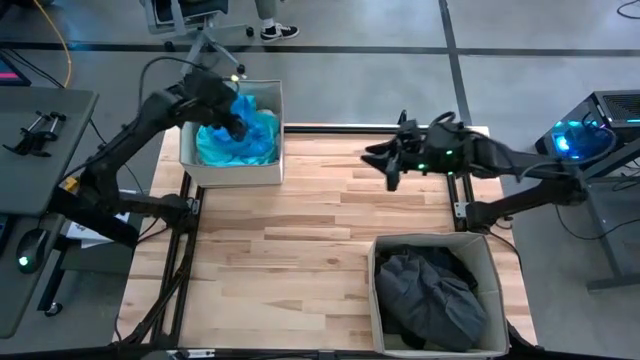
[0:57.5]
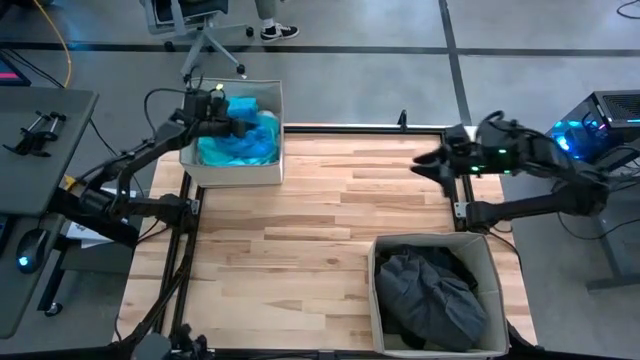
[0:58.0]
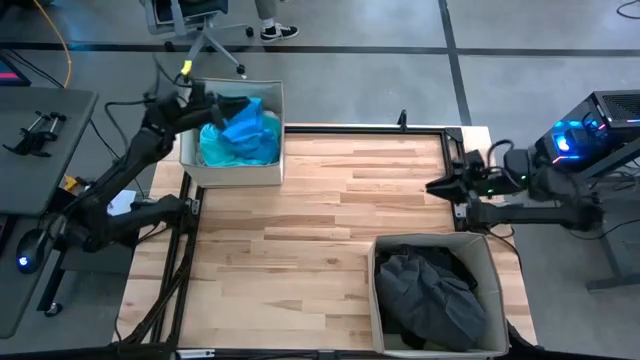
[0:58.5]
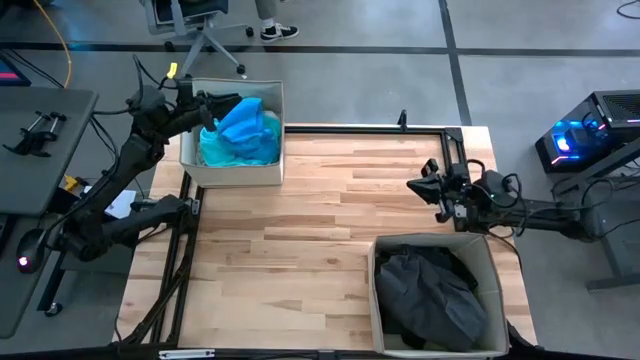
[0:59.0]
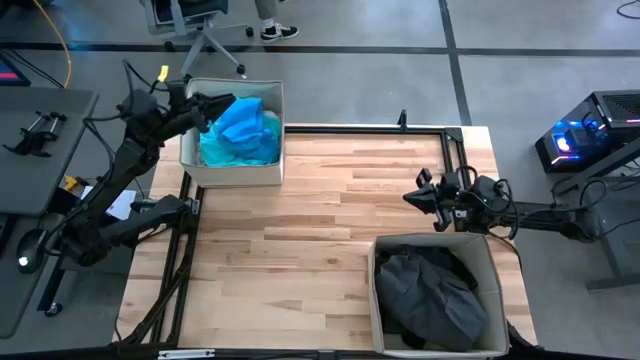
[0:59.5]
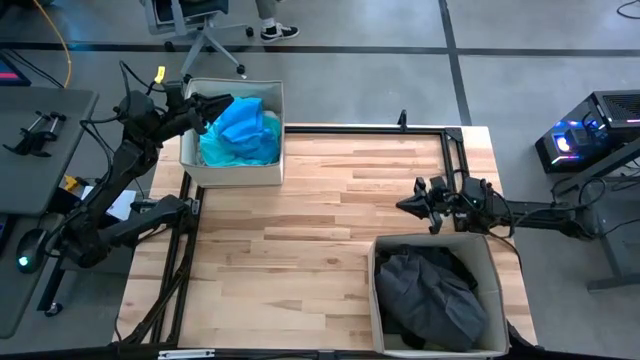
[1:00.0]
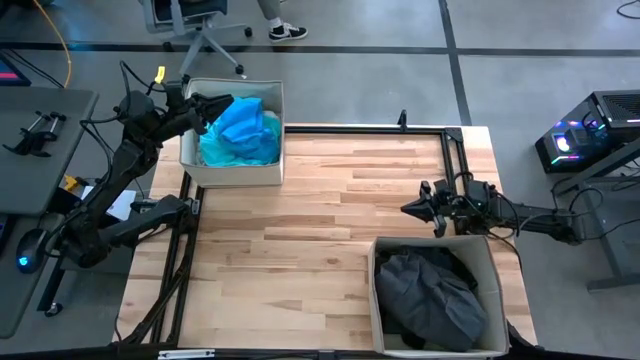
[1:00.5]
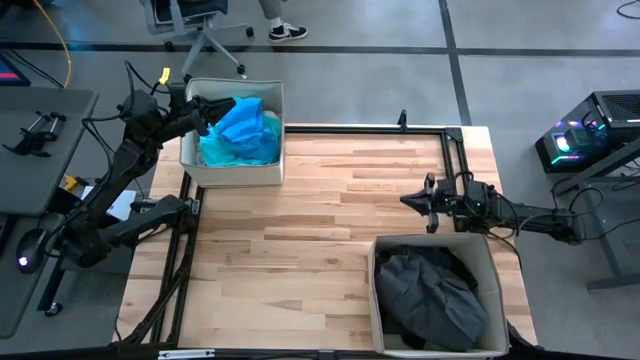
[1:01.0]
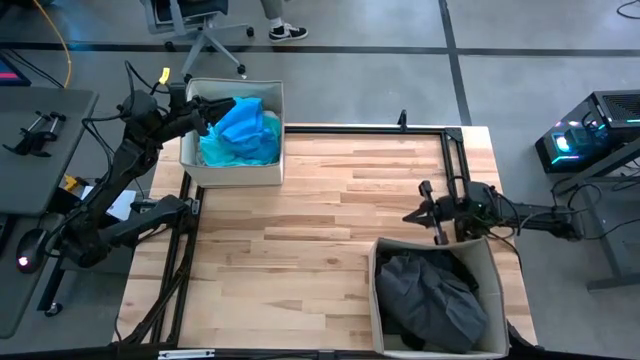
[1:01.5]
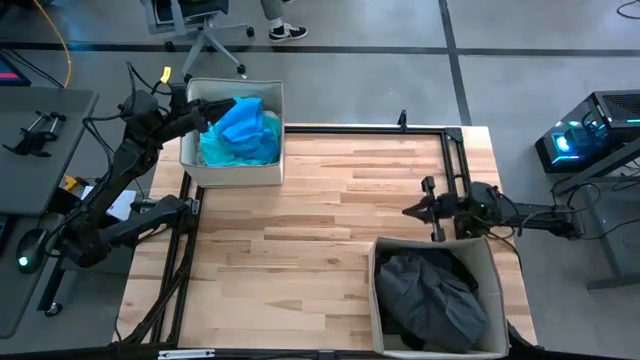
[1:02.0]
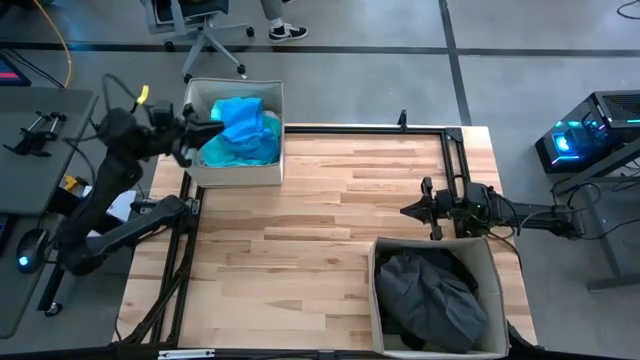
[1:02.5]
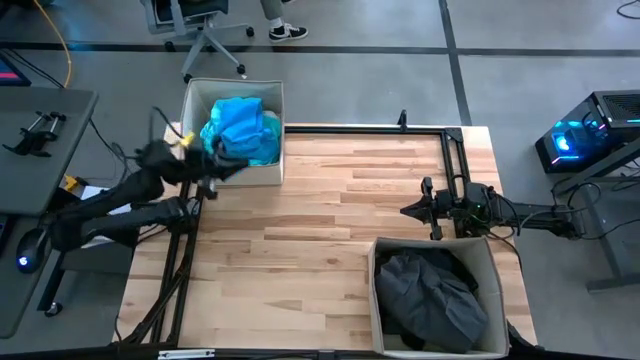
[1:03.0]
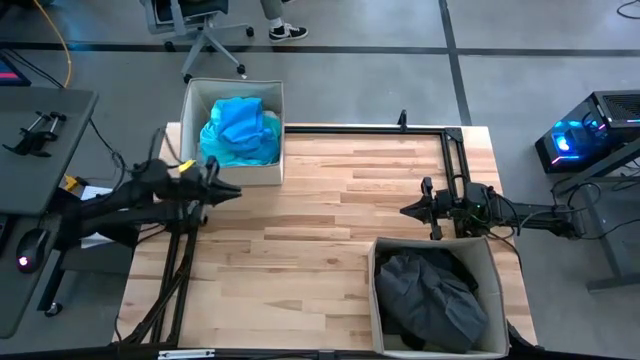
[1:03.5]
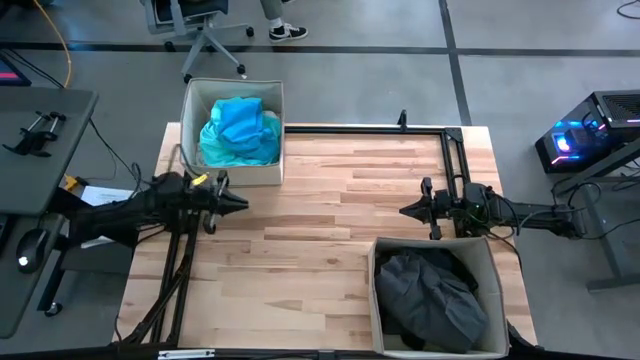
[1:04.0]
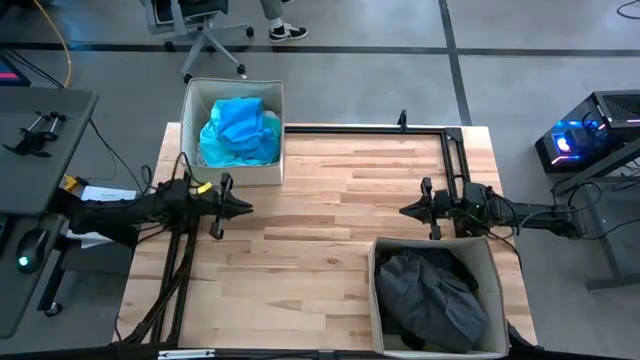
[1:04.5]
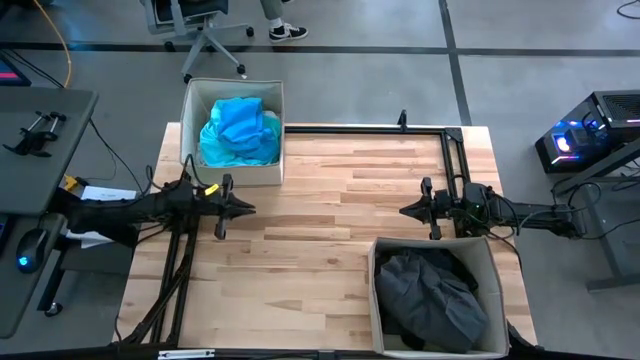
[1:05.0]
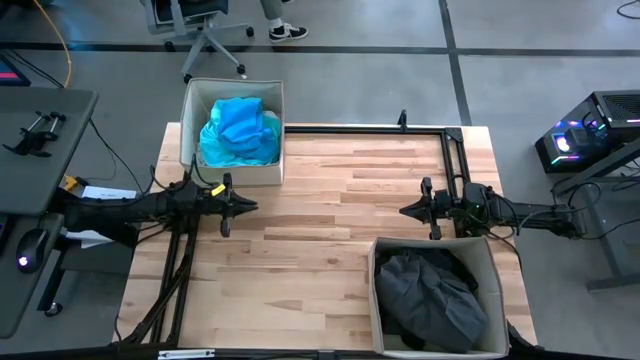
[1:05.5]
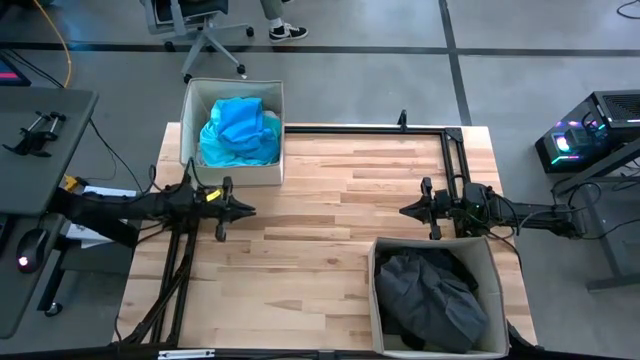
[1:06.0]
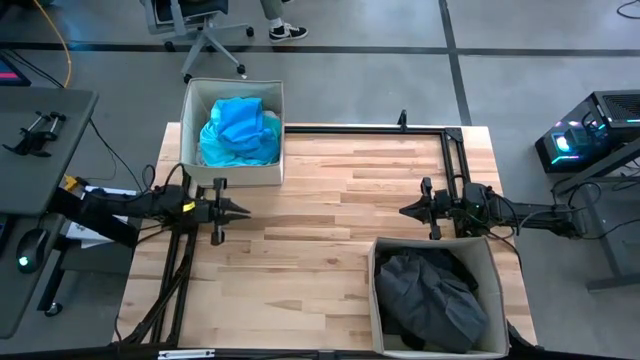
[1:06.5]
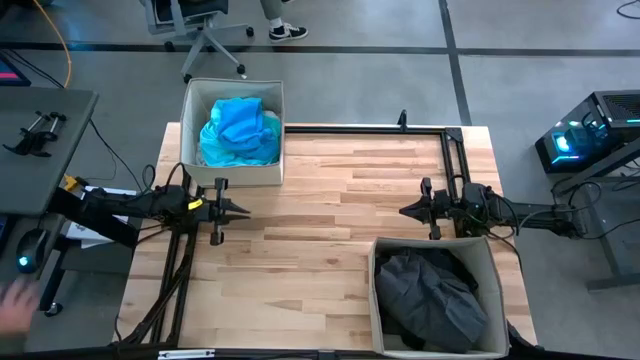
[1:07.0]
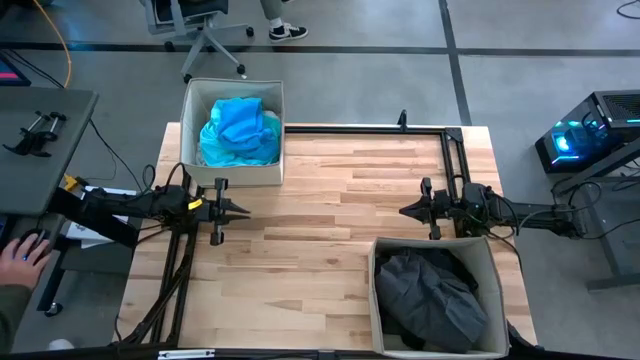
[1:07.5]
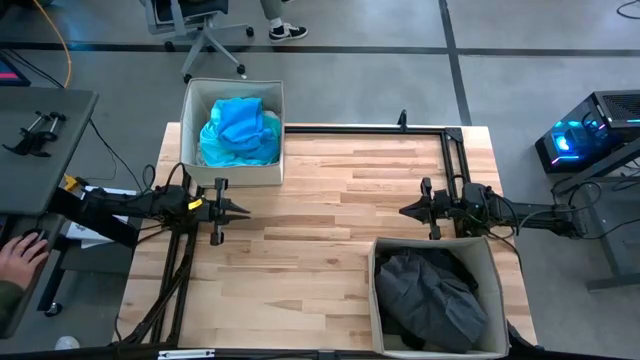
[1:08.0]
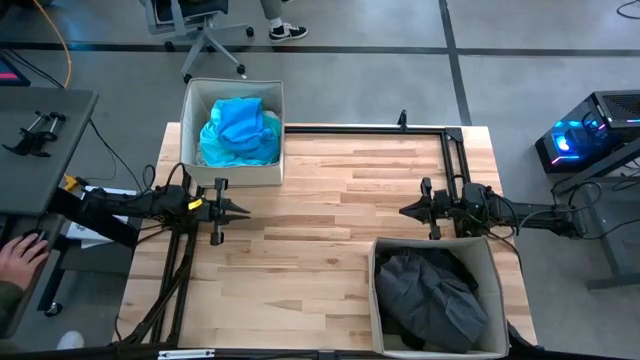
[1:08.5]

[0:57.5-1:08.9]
Task: Sort clothes
Return to Home Position

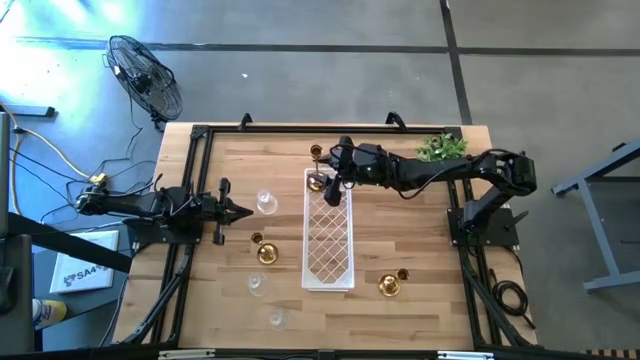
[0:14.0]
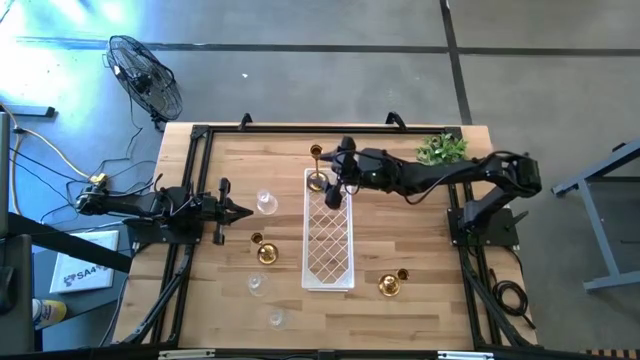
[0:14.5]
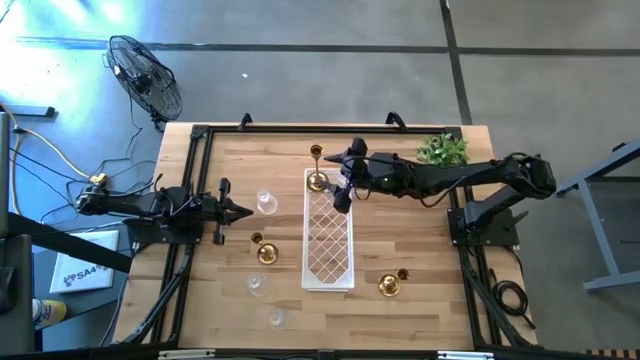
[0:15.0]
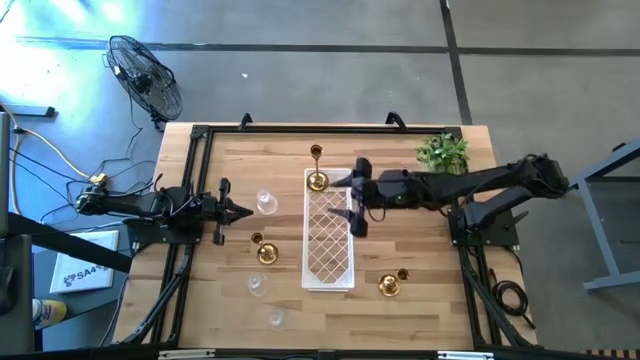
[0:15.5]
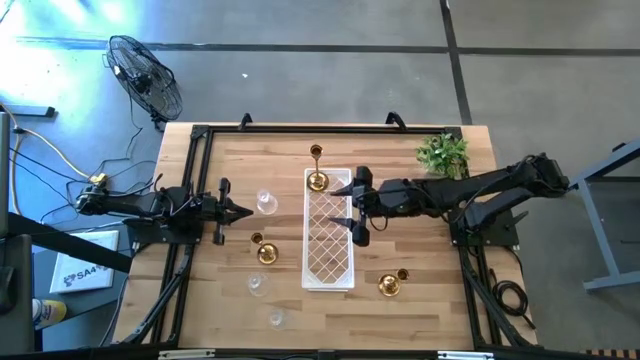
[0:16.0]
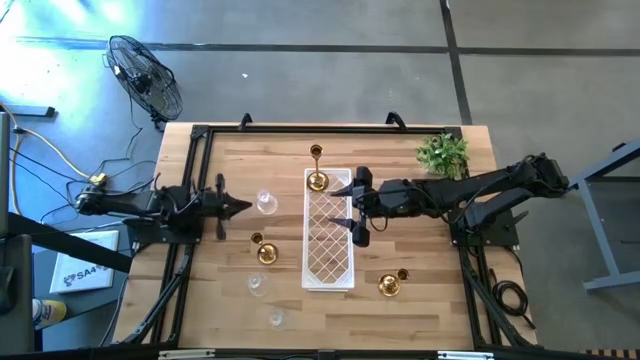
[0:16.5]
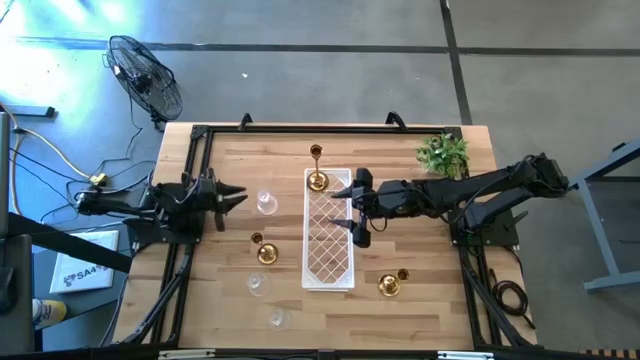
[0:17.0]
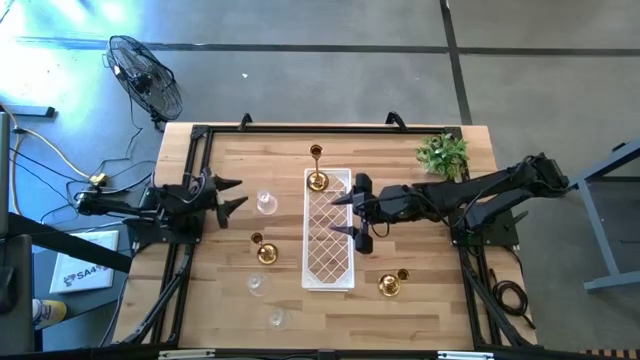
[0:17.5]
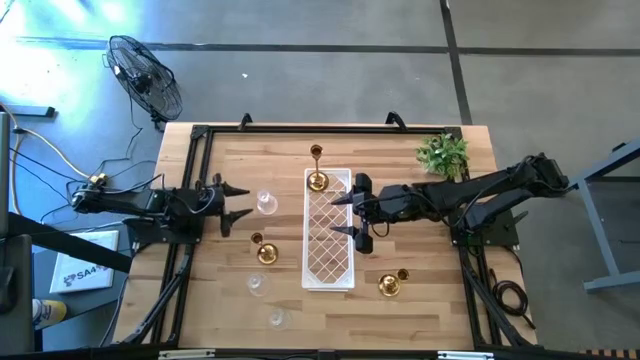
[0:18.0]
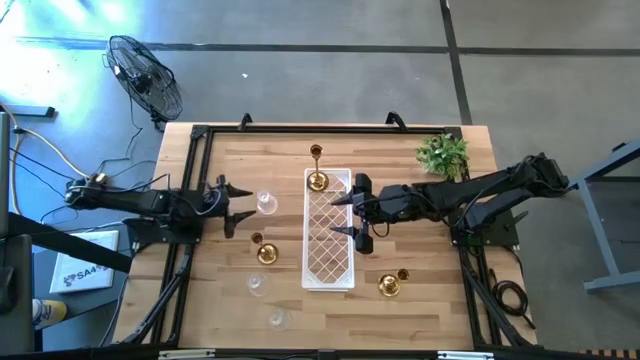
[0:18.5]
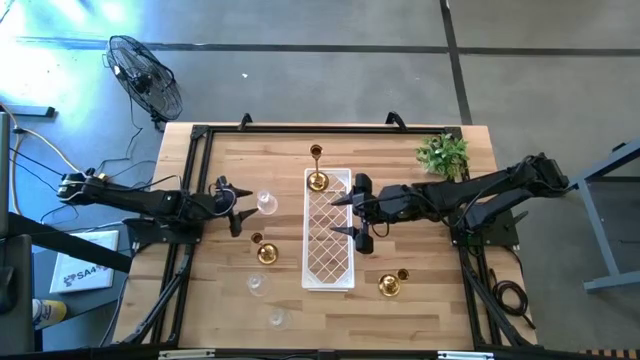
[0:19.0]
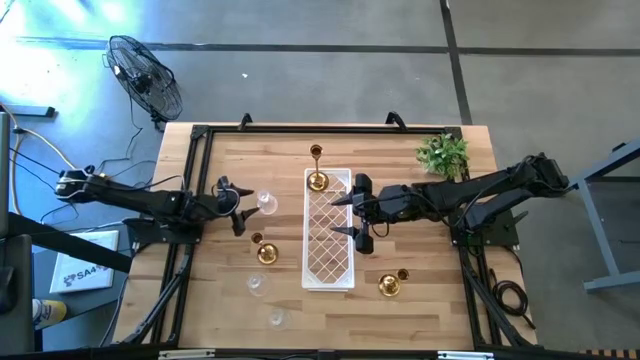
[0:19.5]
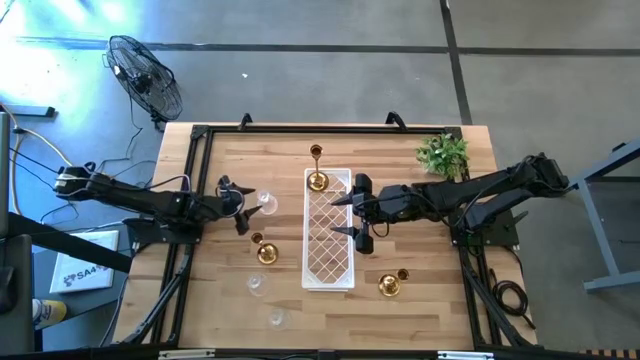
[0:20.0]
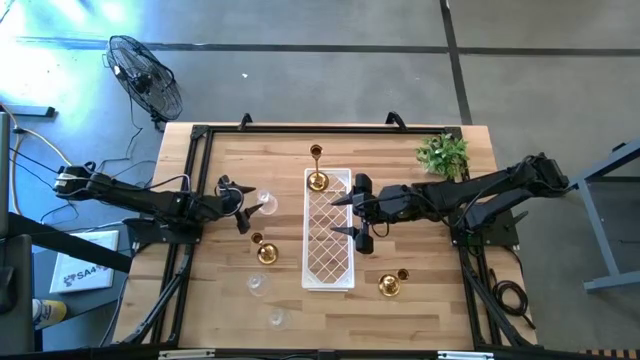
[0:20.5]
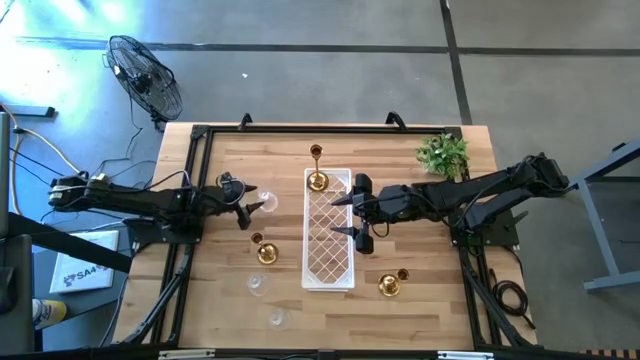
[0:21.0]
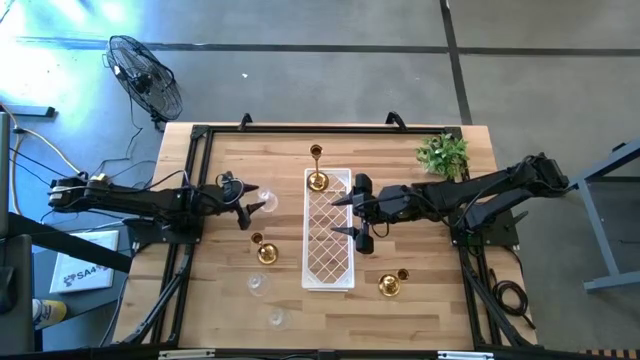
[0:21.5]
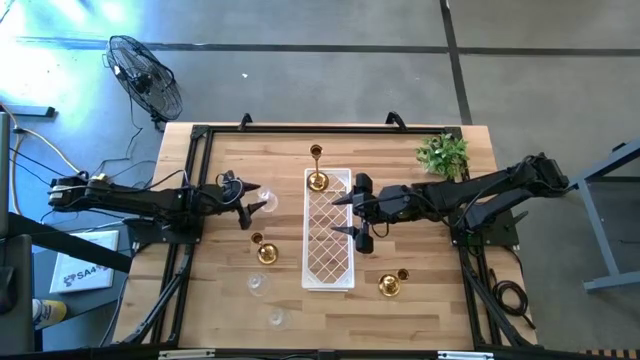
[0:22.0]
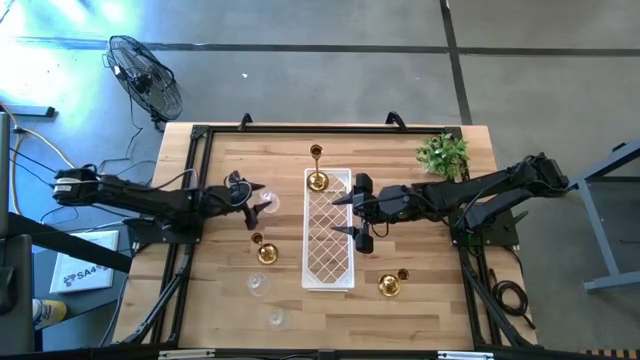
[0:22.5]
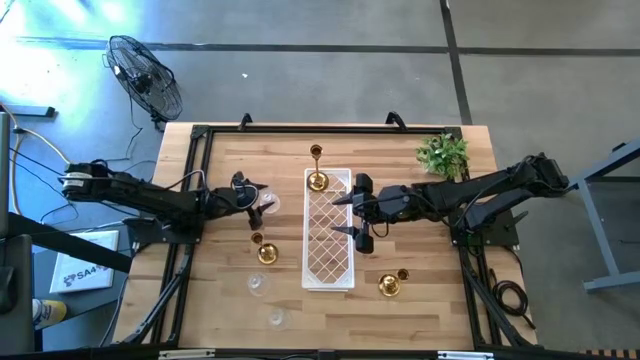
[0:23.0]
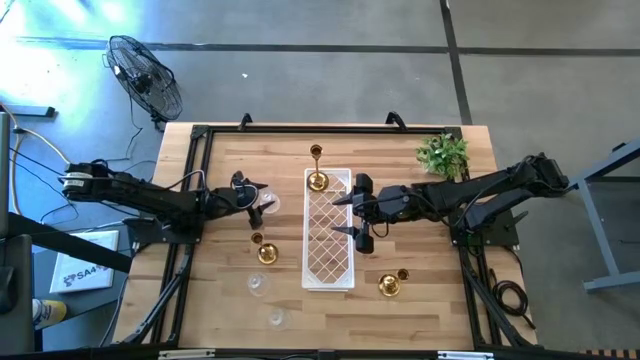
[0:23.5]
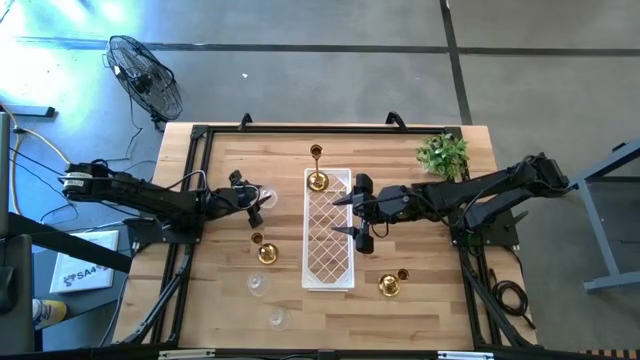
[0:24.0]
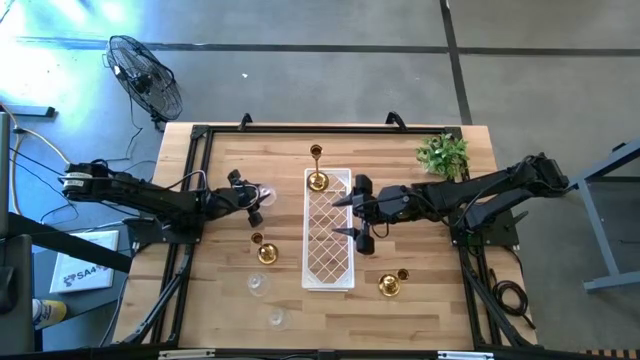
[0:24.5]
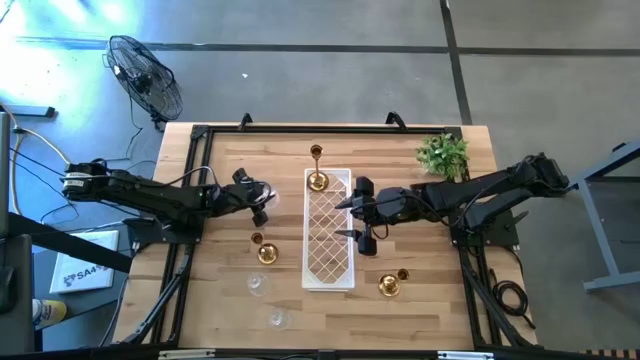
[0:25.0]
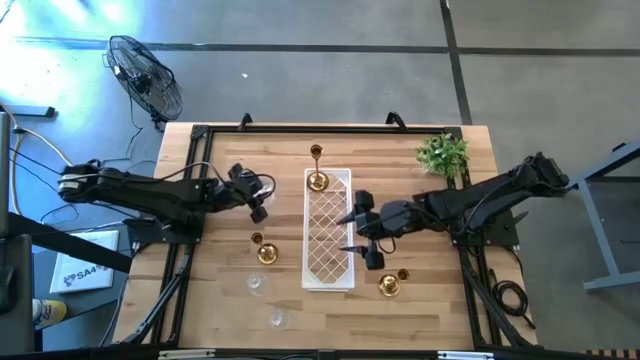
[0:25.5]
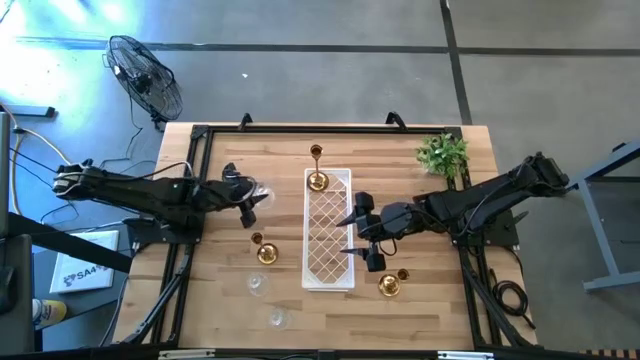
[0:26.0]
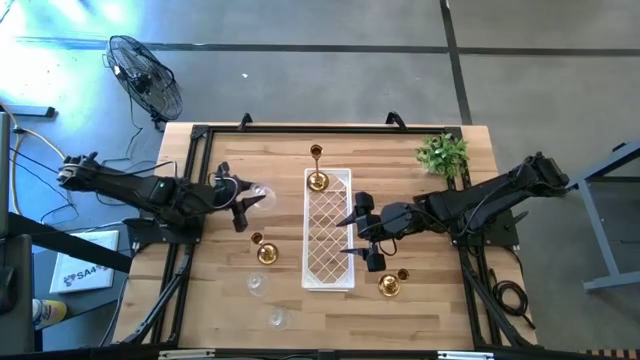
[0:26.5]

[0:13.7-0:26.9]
Task: Pick & Place candle stick holders
Put the top transparent candle holder on the shelf
